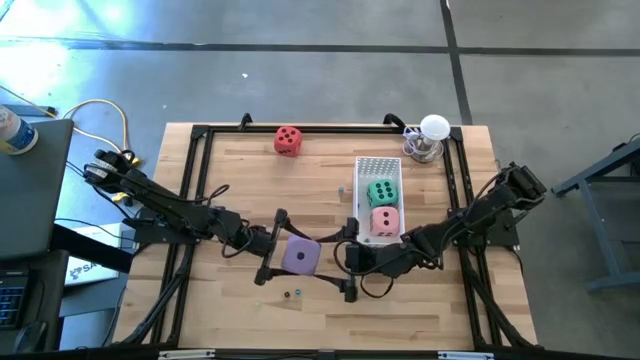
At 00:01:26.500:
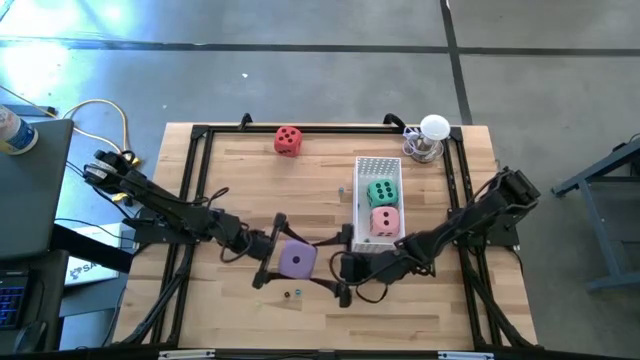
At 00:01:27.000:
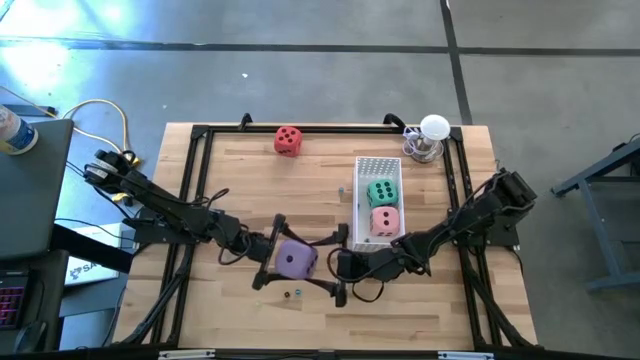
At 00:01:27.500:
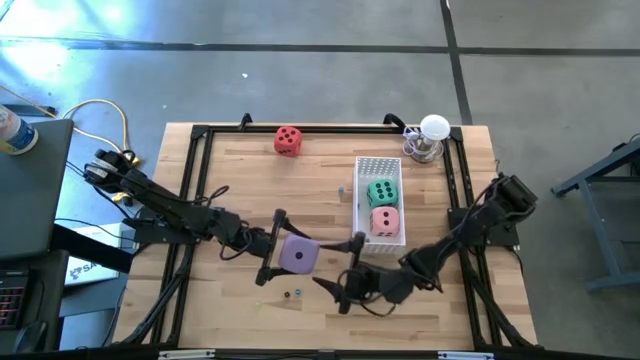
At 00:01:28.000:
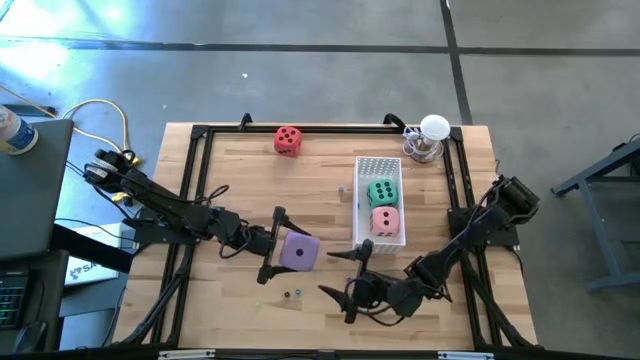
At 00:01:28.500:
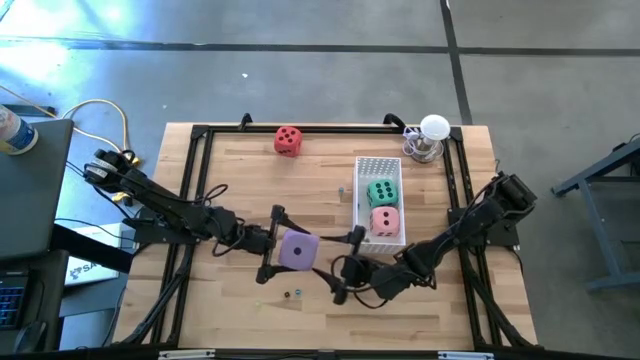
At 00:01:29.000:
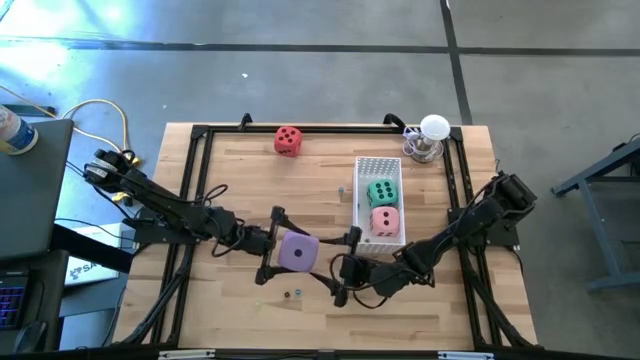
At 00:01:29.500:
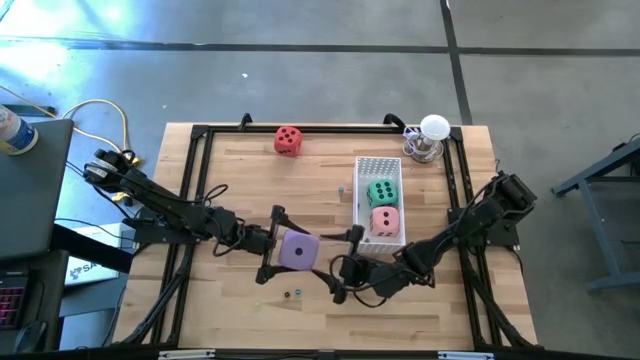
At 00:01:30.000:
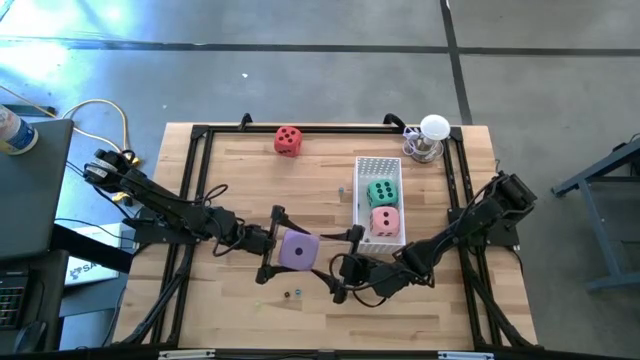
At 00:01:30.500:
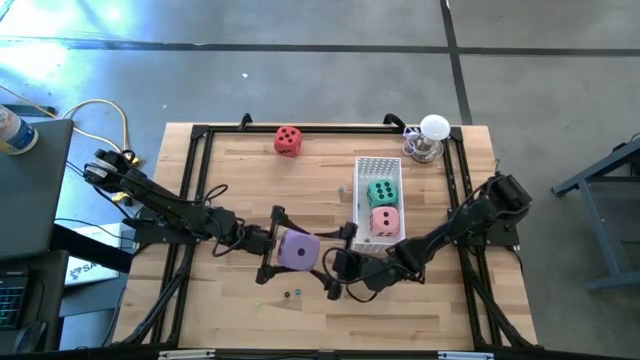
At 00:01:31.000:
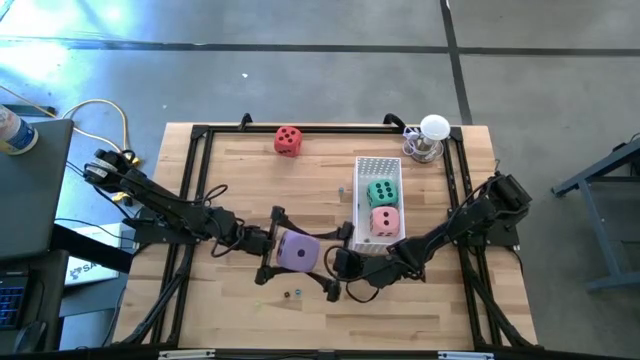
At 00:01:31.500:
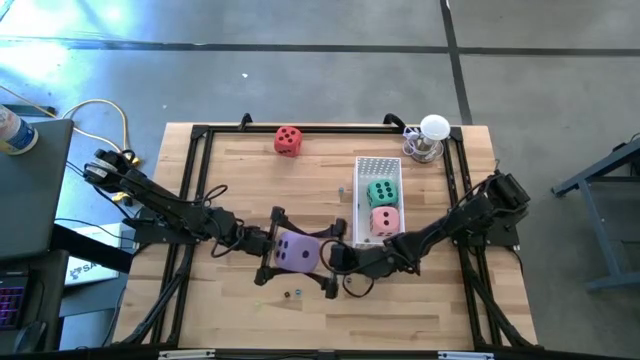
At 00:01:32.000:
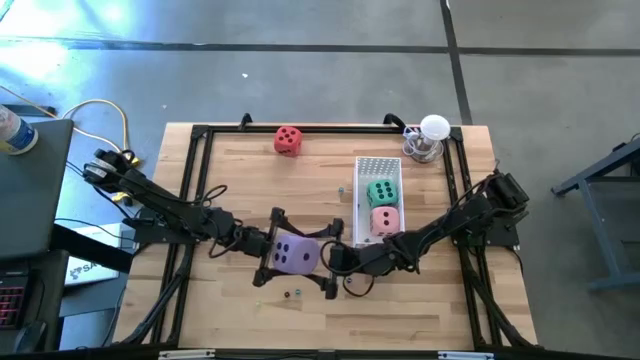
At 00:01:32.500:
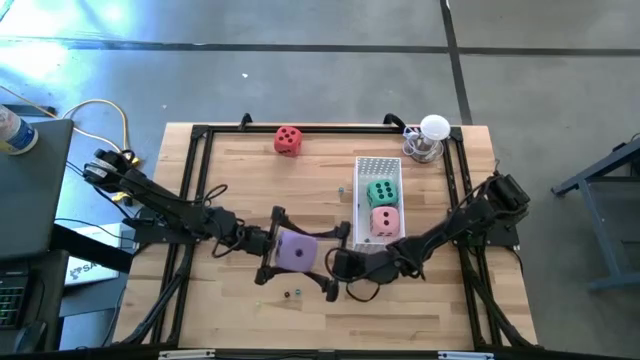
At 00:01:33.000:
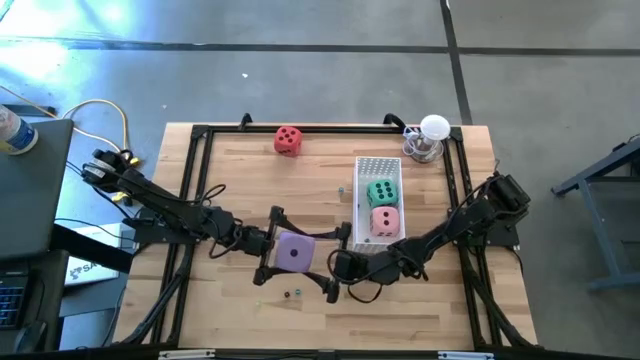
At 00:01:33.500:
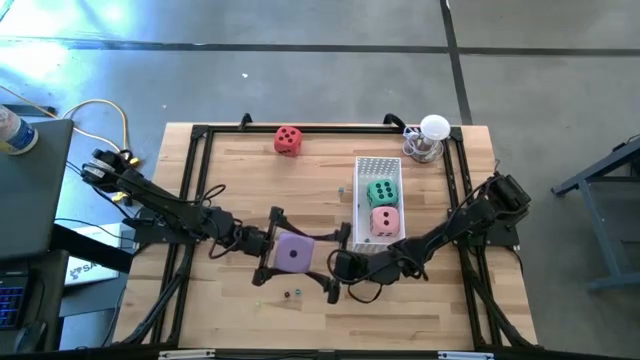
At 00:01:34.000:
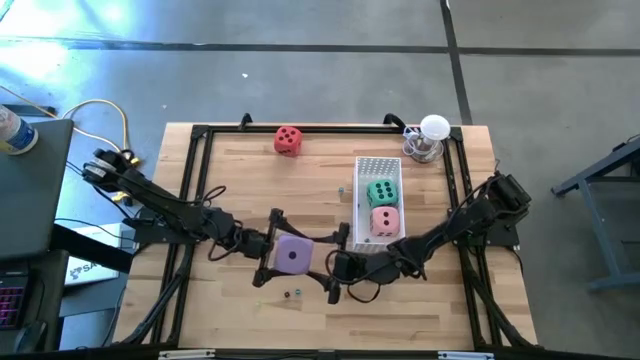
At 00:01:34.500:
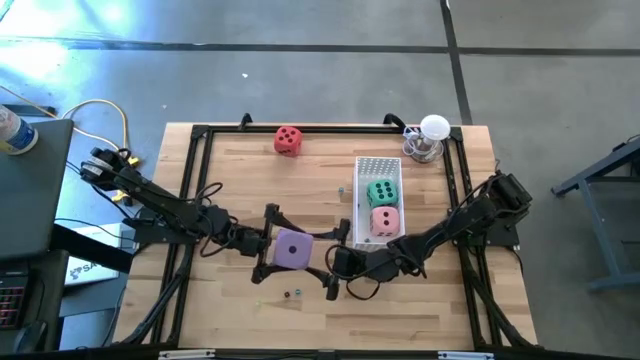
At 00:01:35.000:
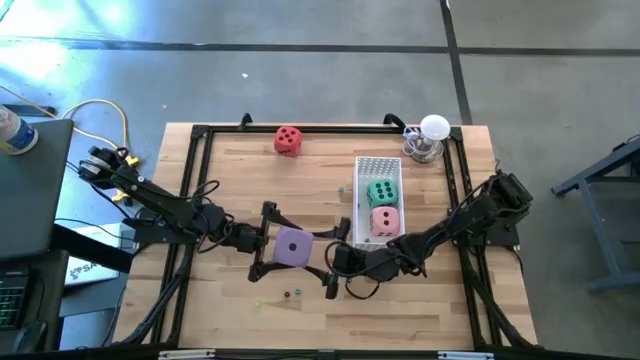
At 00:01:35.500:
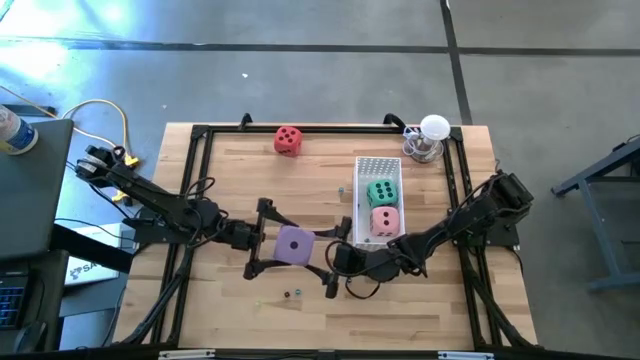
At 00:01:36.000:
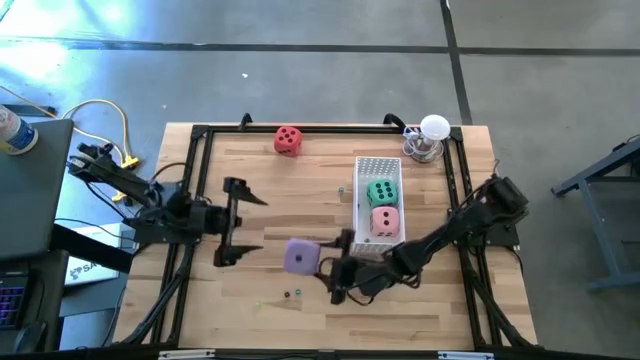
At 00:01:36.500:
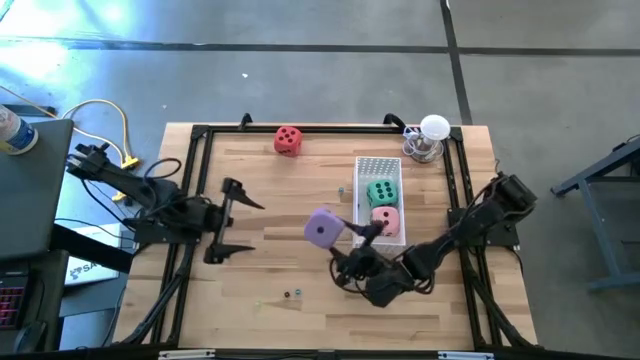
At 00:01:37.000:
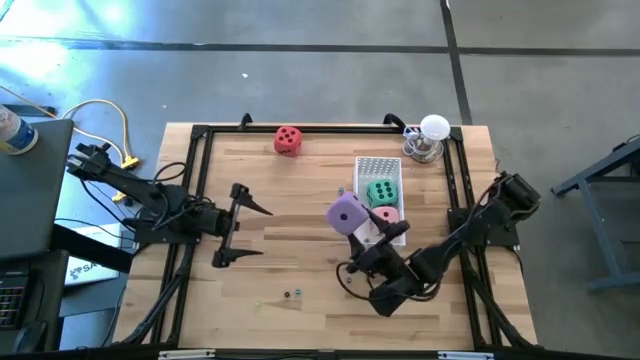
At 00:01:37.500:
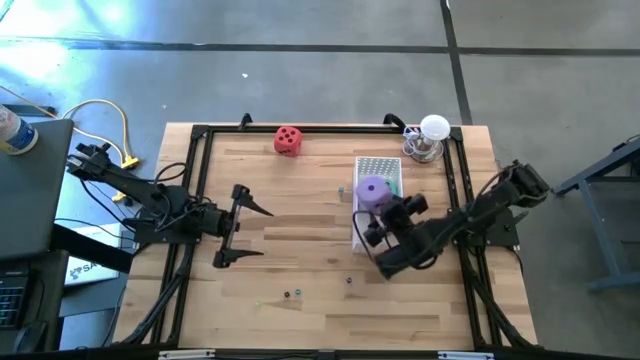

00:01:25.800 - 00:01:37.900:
Task: Pick & Place Dice
Put the purple die into the white bin

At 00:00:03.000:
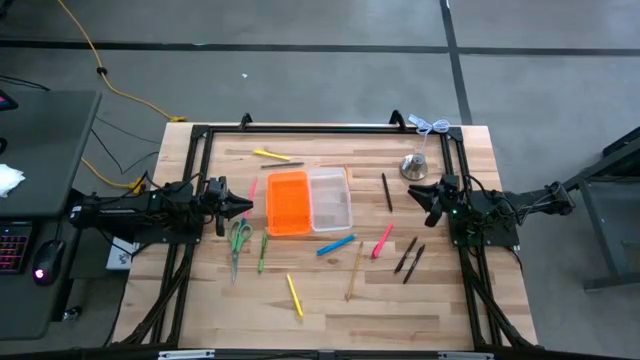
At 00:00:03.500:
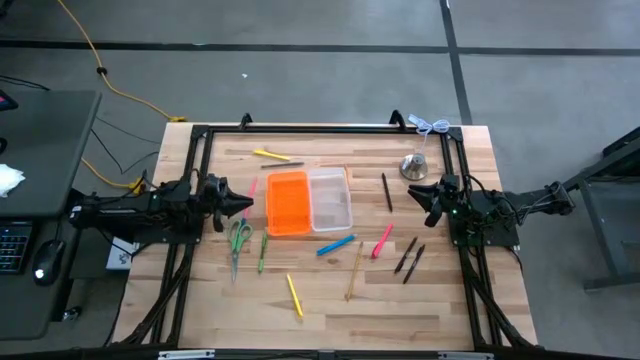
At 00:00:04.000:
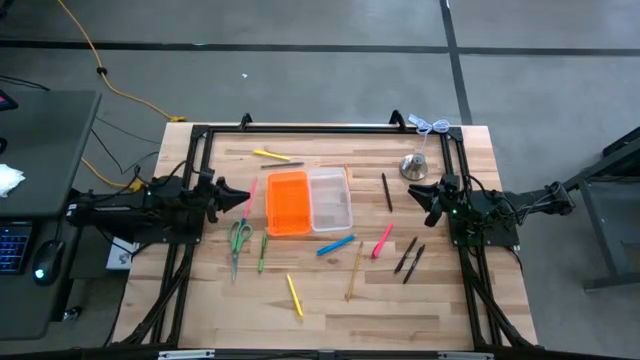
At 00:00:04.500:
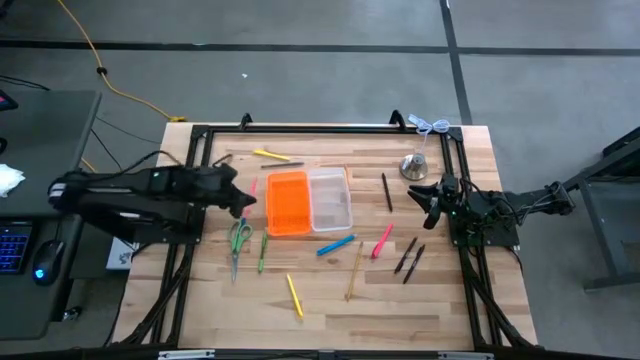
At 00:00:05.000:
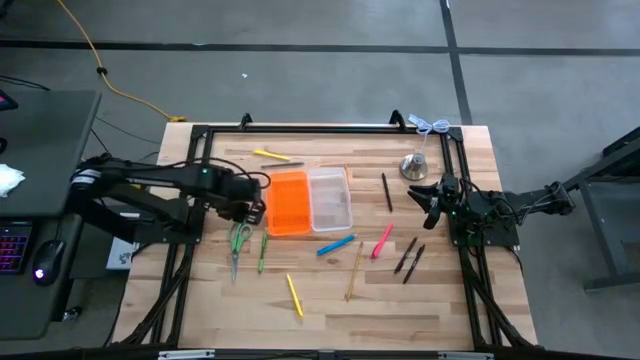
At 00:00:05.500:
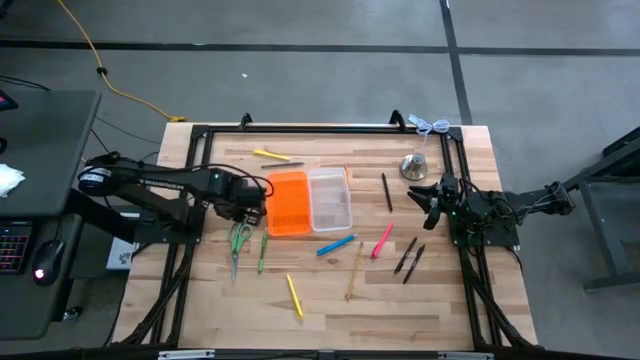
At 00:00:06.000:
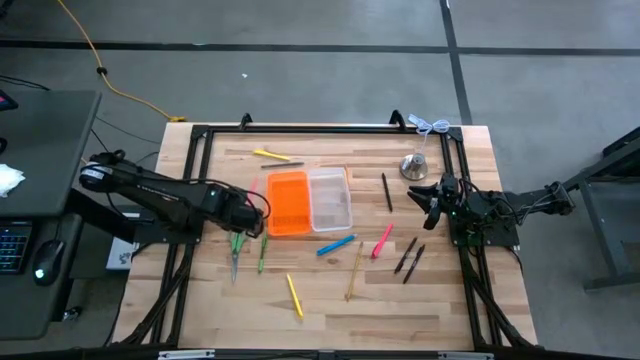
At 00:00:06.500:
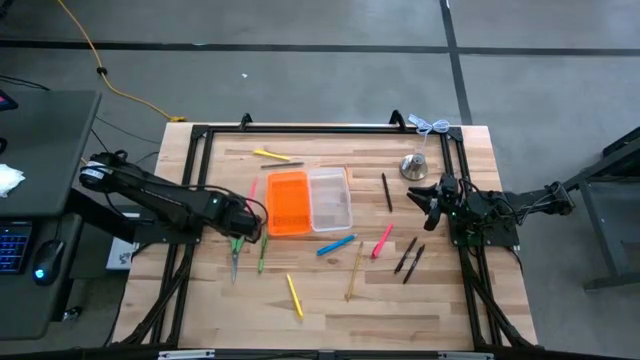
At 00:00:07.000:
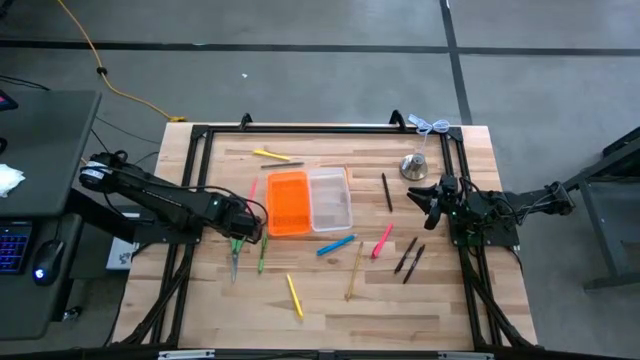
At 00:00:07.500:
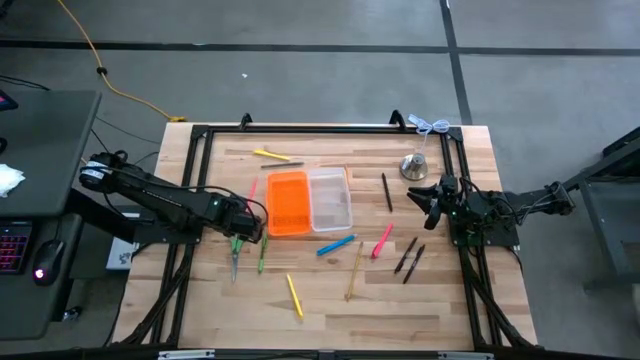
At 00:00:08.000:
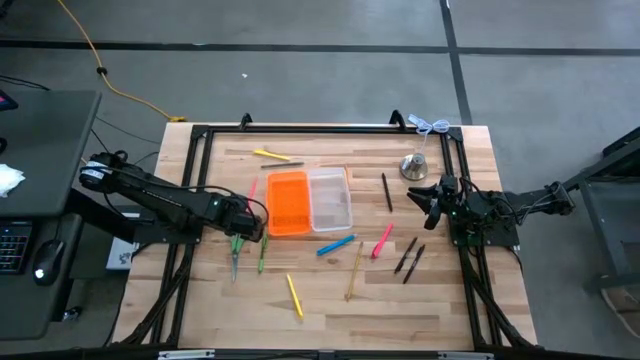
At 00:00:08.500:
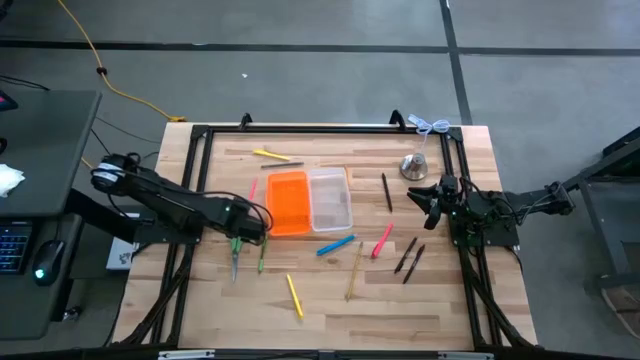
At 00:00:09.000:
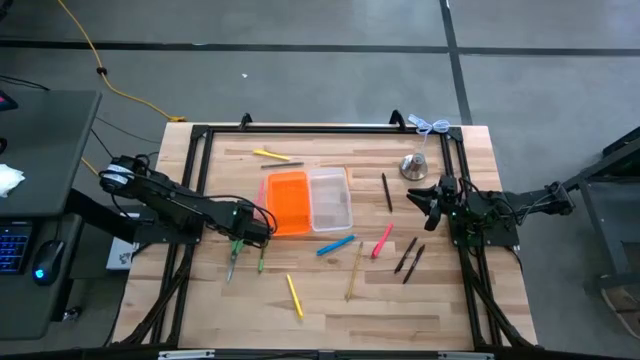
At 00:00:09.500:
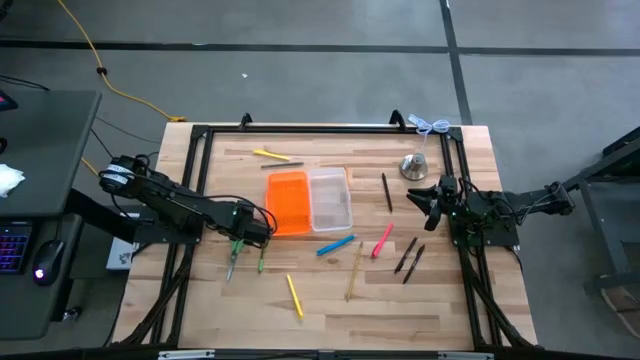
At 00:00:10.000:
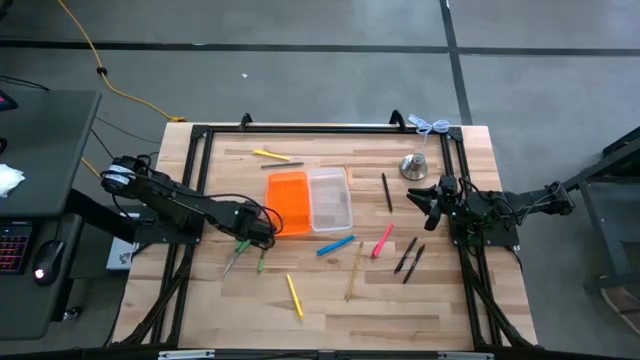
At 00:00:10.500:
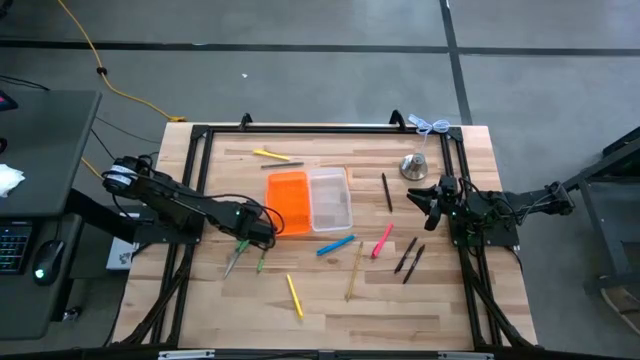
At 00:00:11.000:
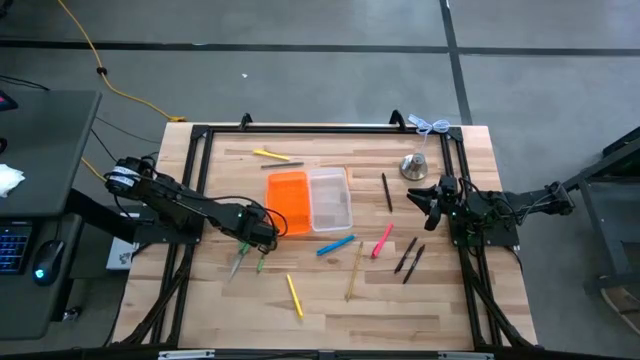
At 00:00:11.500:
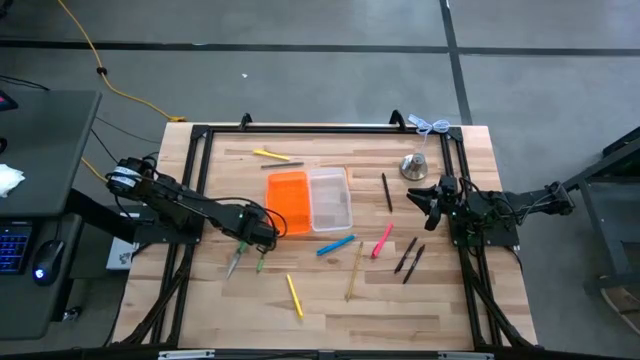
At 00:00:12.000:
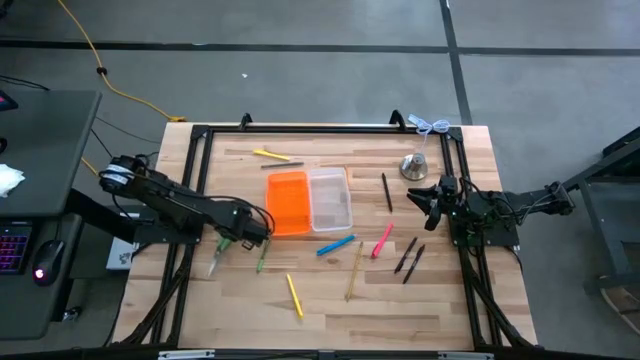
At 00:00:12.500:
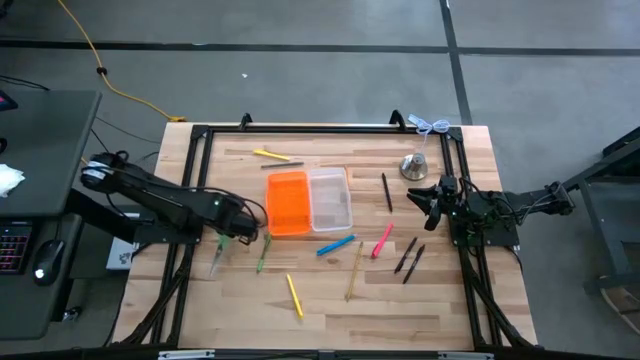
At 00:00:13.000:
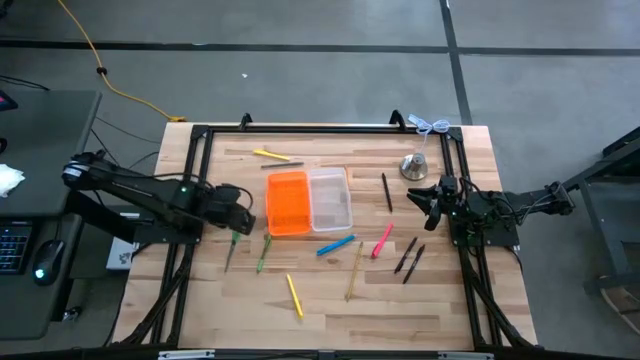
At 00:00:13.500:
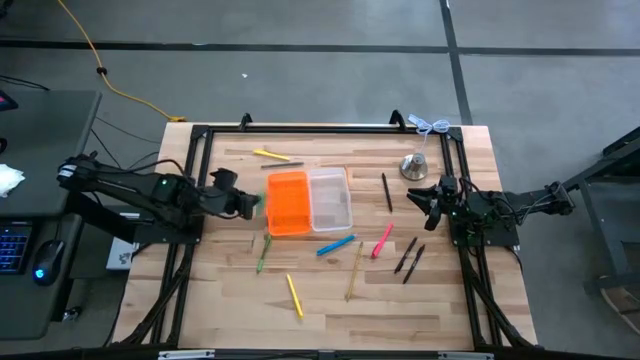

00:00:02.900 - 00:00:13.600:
Task: Pick & place school supplies into a supply box
Put the green scissors into the supply box
